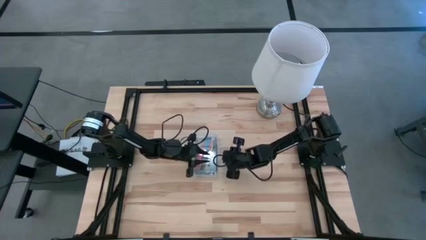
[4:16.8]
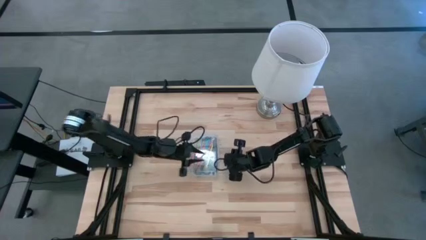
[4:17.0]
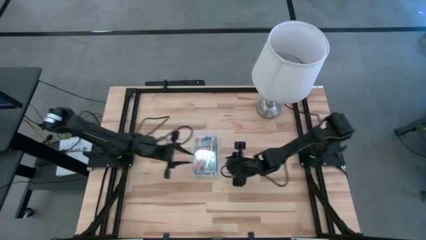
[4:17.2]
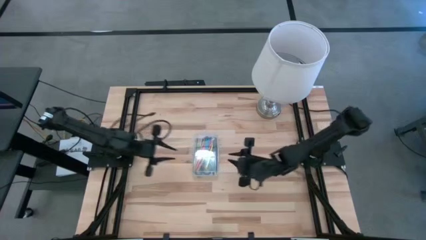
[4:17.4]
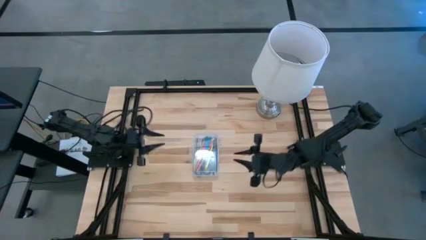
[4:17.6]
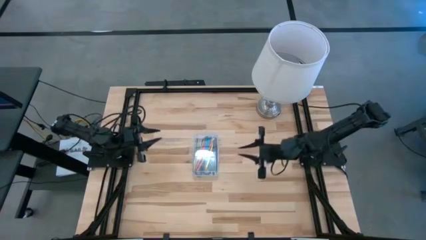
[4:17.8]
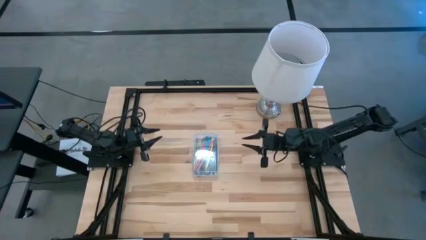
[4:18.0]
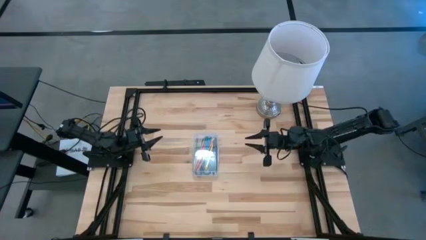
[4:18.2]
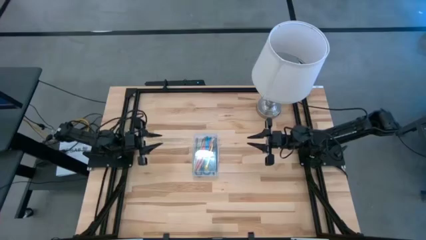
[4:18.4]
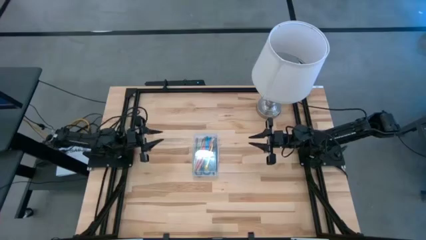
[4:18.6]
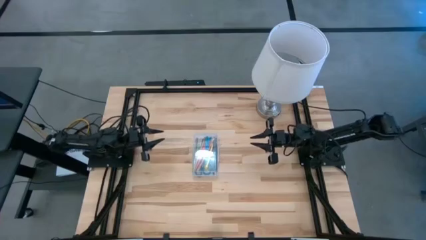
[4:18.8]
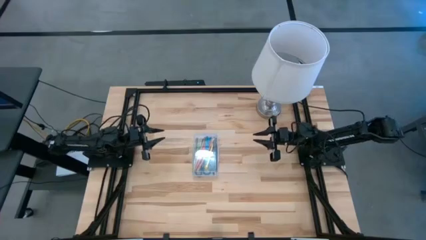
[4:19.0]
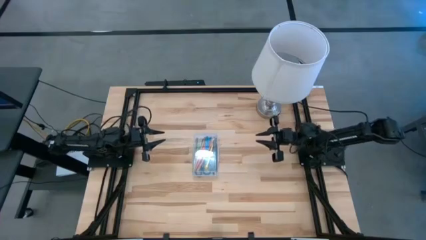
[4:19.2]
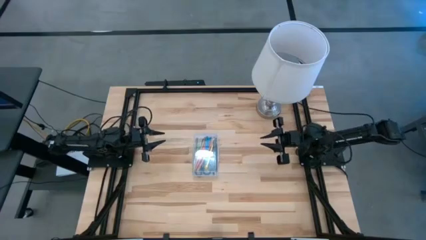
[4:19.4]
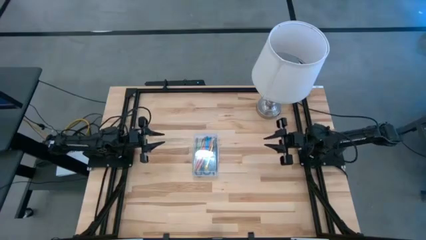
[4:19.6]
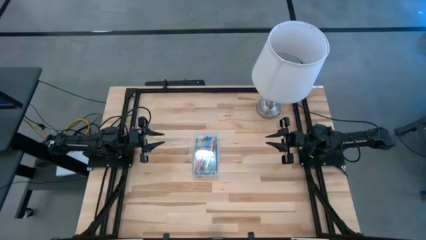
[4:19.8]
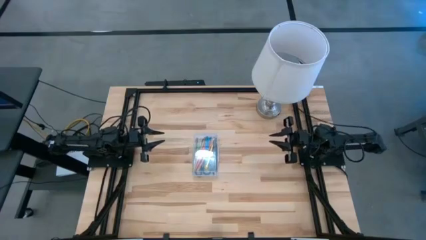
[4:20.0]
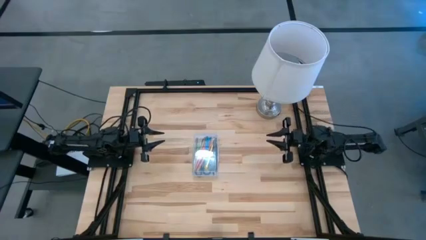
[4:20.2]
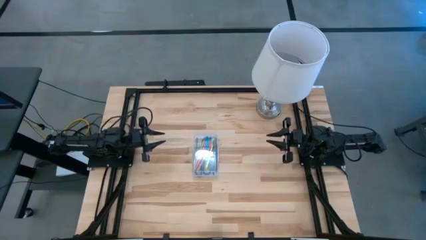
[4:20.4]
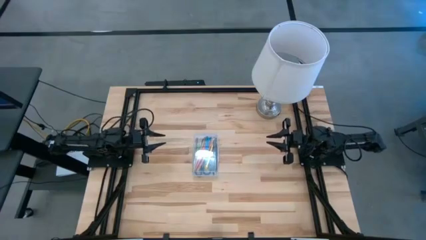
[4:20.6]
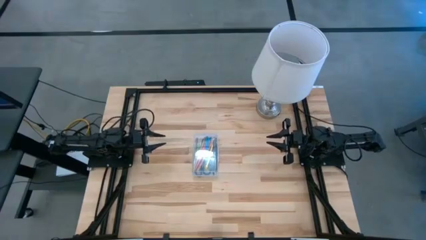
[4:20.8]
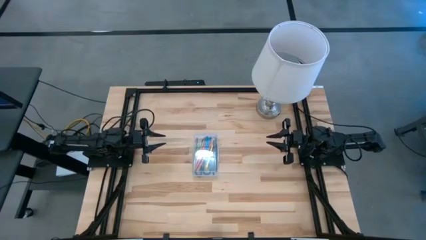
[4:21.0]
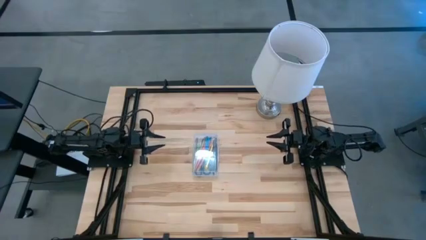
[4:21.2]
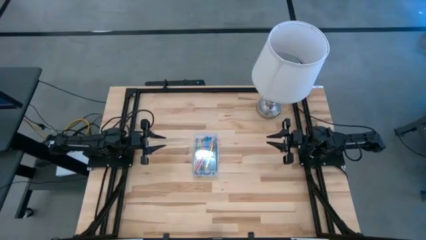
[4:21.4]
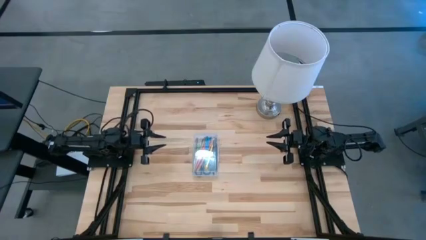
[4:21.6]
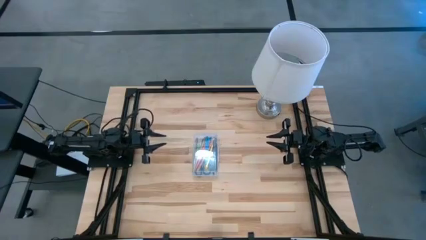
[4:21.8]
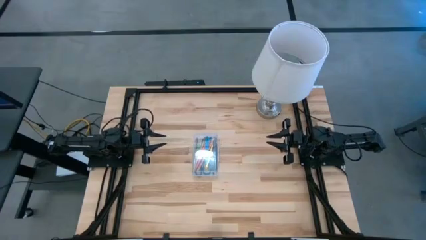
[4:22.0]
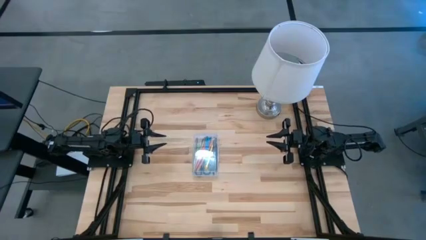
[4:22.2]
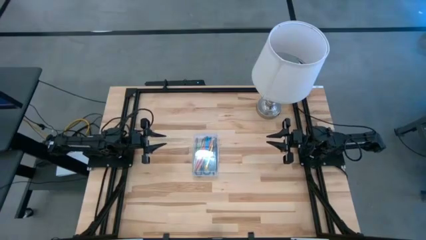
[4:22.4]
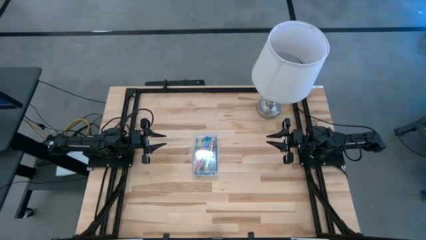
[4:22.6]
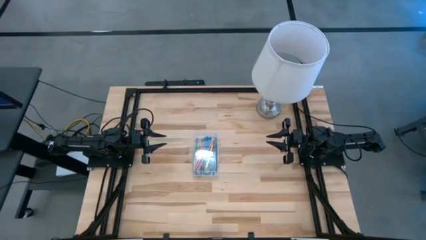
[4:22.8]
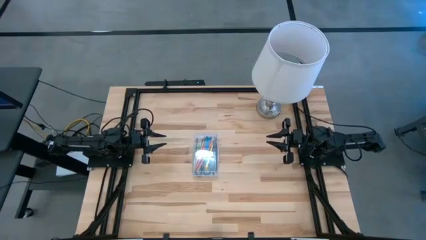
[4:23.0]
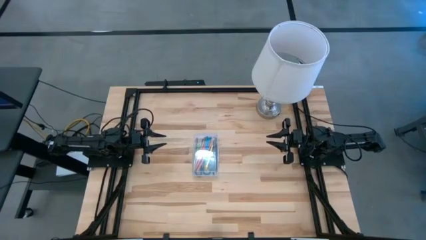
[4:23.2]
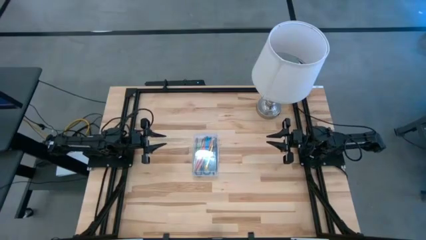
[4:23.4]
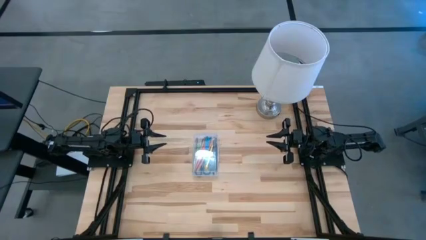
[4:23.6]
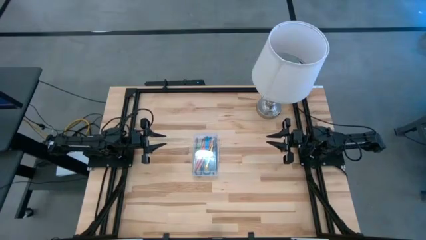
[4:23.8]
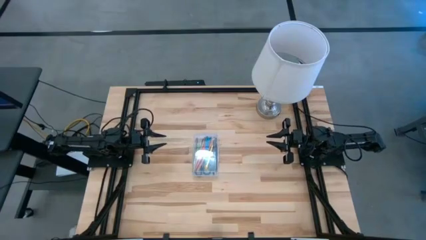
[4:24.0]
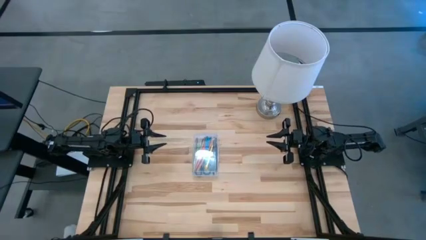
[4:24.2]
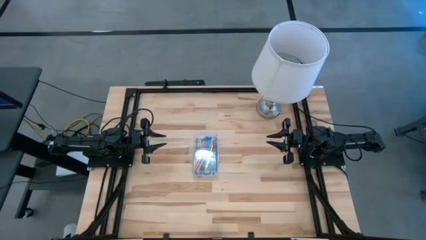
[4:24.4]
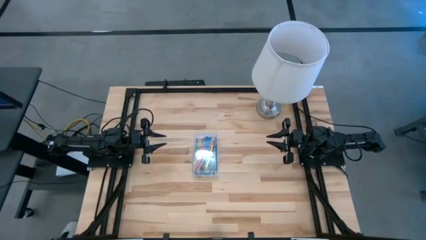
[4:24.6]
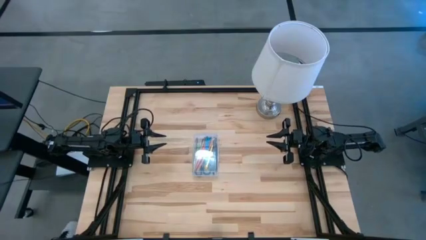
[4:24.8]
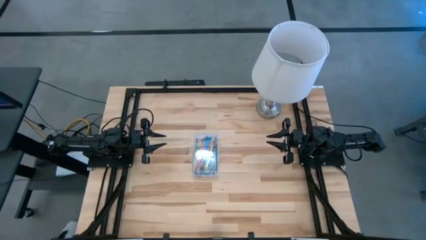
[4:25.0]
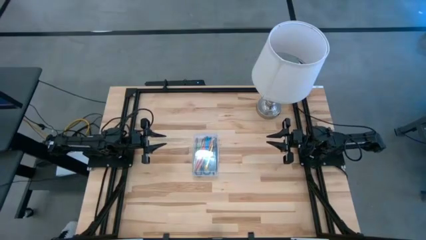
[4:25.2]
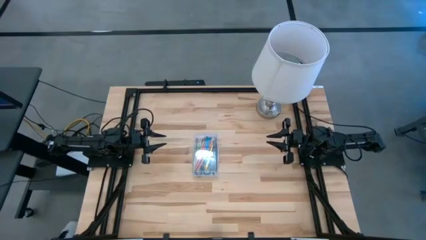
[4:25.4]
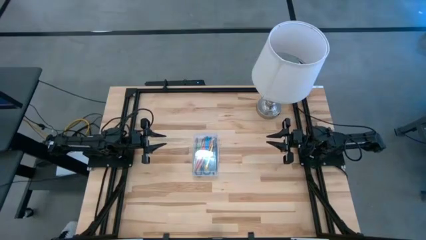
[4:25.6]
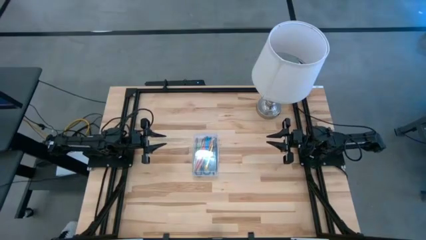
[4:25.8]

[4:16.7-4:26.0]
Task: Pick & place school supplies into a supply box
Return to Home Position

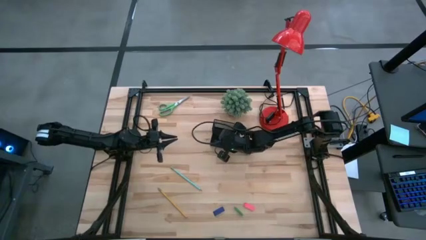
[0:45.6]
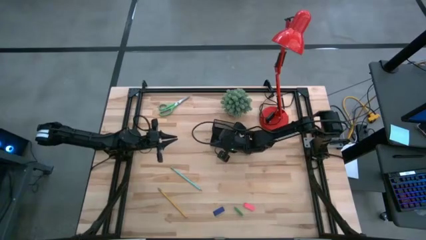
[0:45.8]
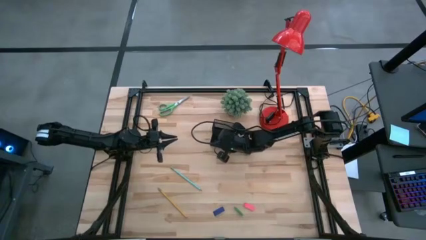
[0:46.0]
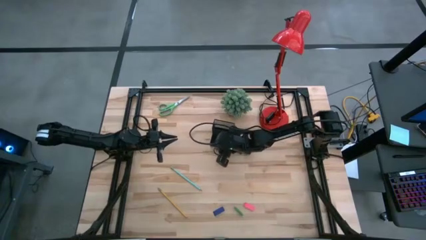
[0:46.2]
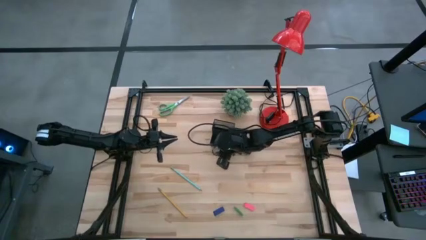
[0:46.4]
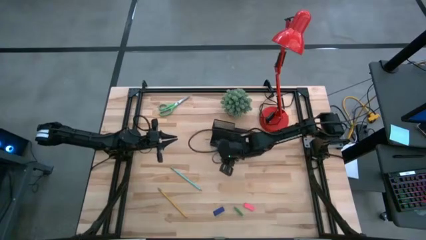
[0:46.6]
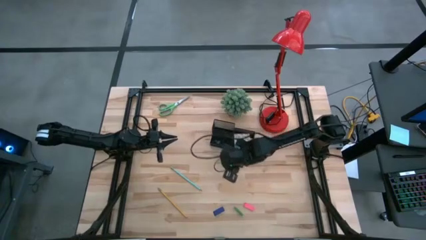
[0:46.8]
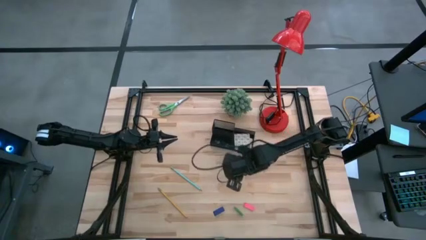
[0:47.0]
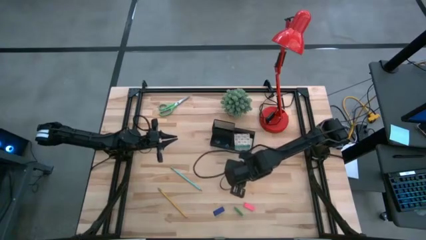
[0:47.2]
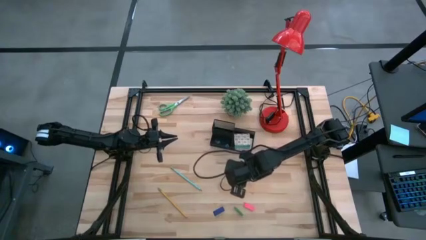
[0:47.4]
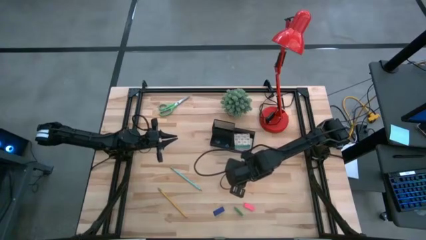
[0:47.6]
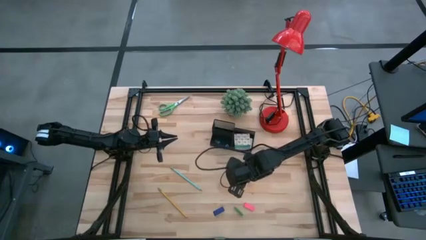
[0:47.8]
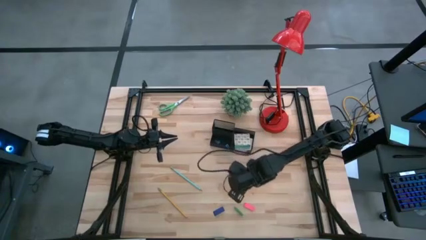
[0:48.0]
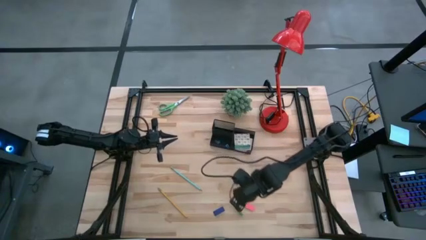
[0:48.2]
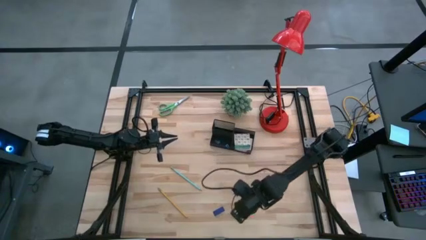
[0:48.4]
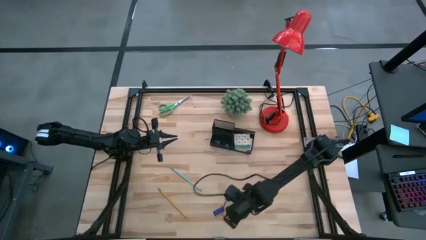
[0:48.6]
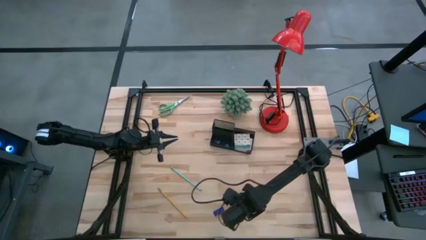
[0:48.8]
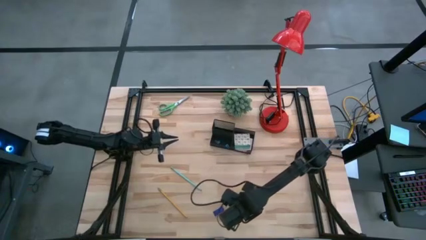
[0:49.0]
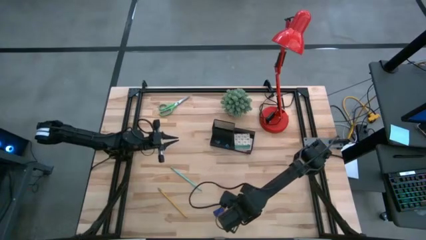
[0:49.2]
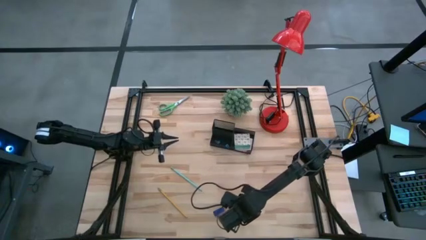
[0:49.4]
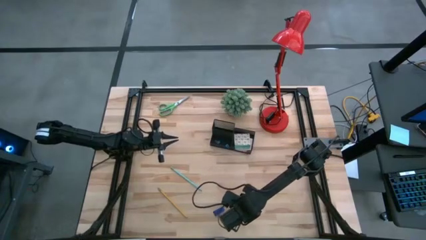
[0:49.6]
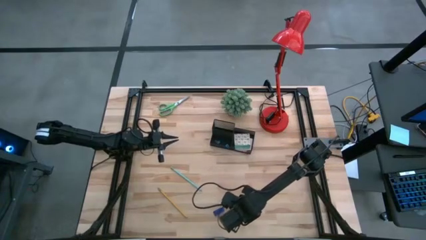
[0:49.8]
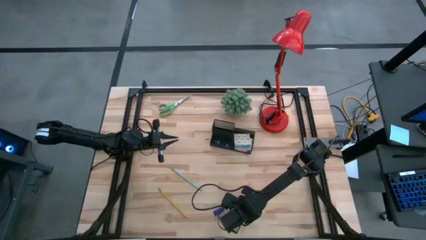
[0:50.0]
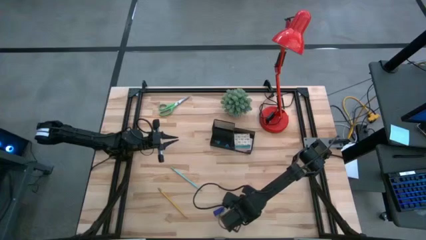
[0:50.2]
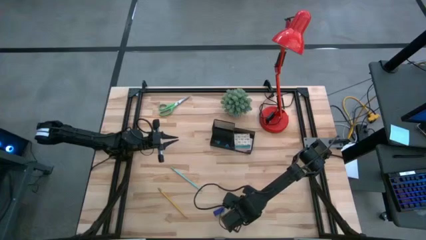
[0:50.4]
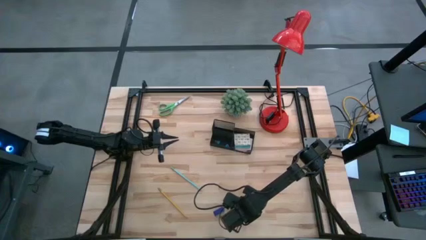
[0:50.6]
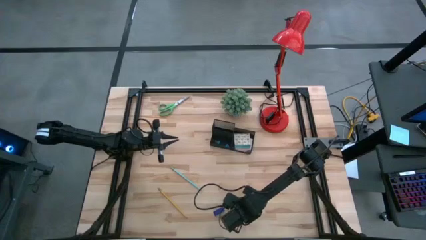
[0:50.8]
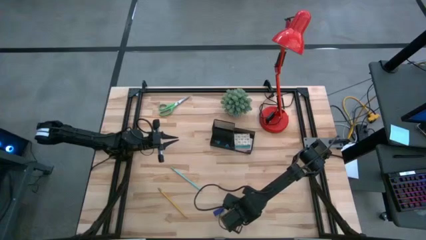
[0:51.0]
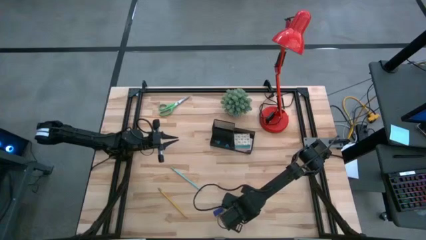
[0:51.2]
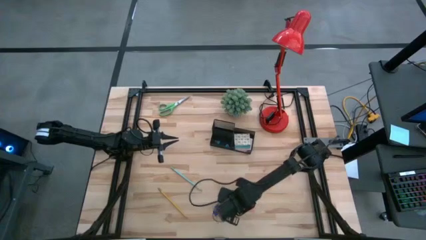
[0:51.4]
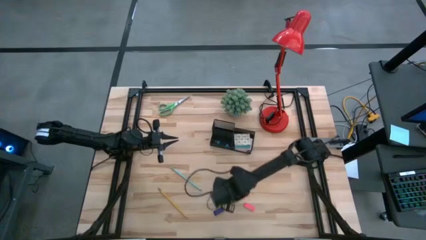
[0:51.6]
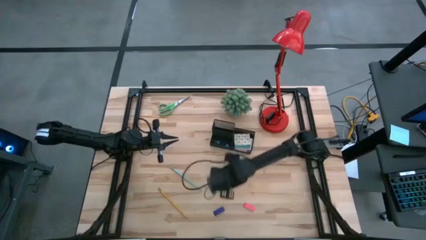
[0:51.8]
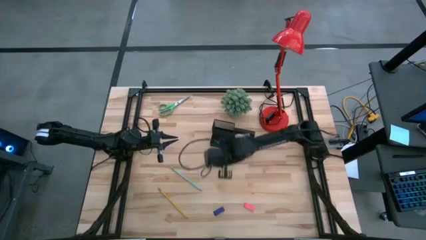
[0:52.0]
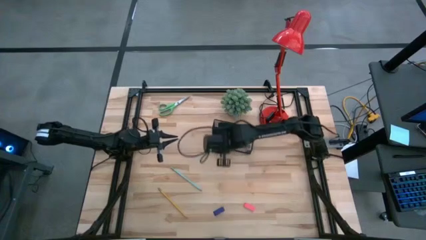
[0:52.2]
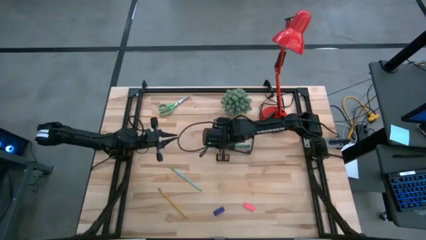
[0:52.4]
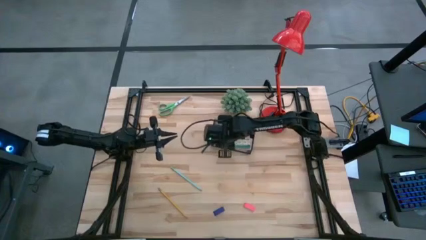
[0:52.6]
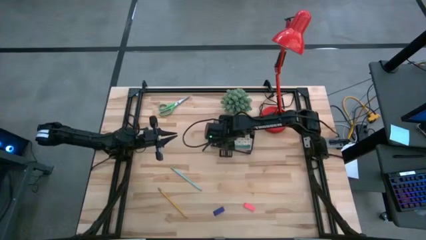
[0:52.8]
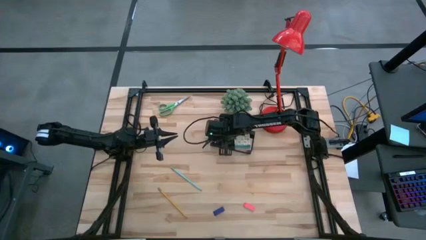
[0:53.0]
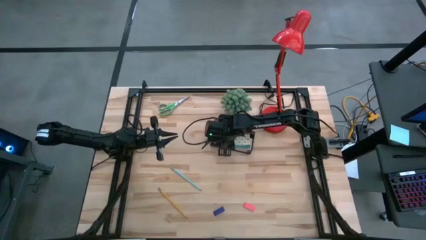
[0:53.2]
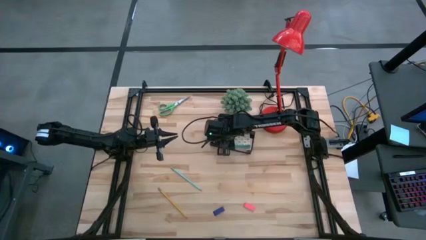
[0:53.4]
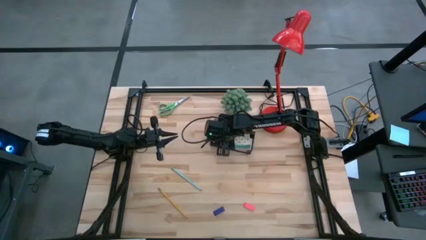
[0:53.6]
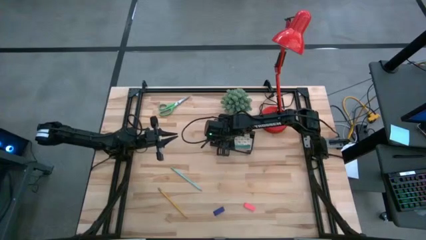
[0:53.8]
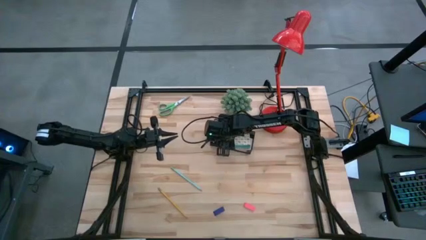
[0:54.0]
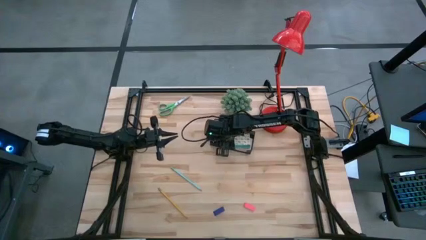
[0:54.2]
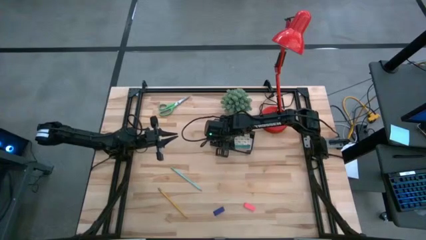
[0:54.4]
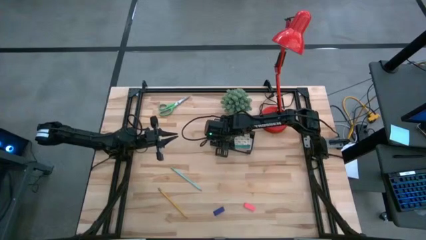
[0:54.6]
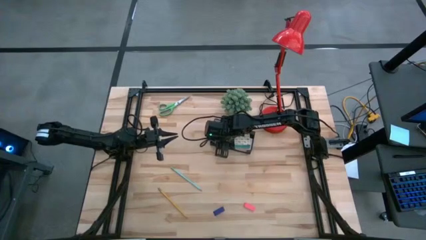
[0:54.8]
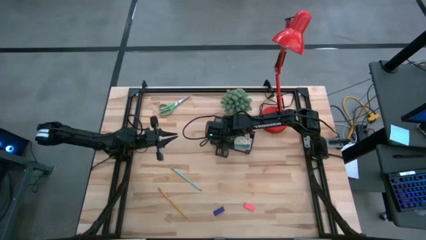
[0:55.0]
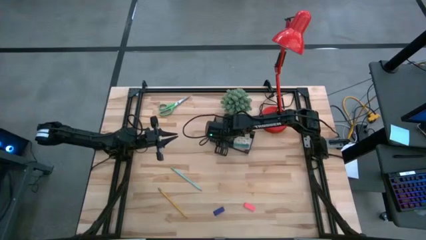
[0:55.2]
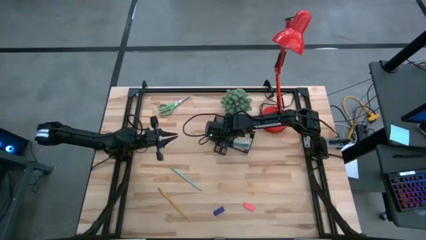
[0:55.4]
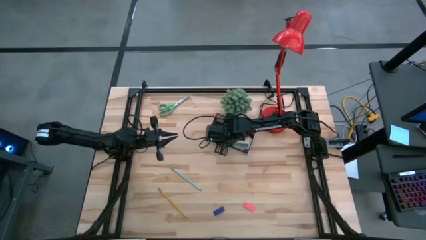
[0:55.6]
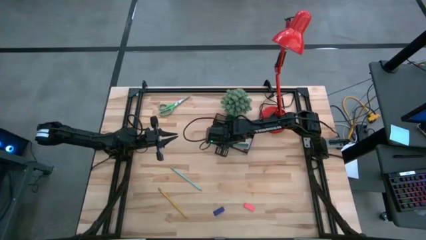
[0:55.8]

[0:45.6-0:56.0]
Task: Pick and place office supplies into organizer
Put the green eraser into the black desk organizer
